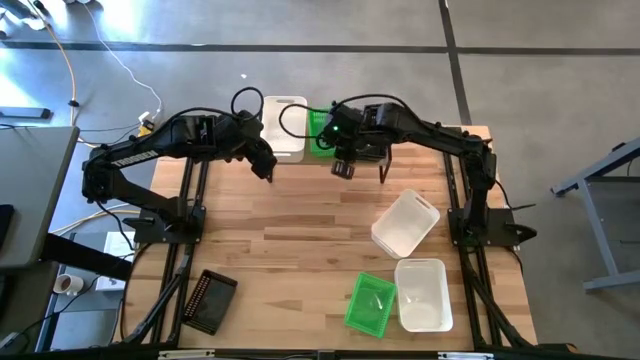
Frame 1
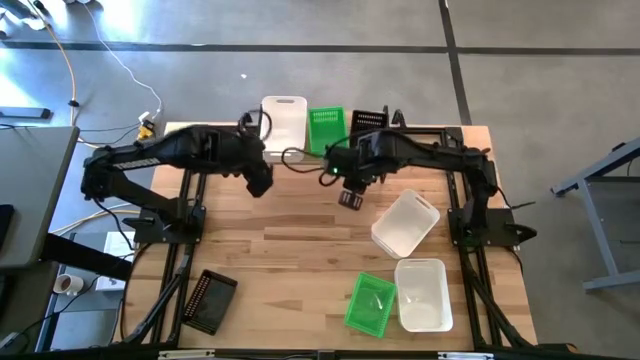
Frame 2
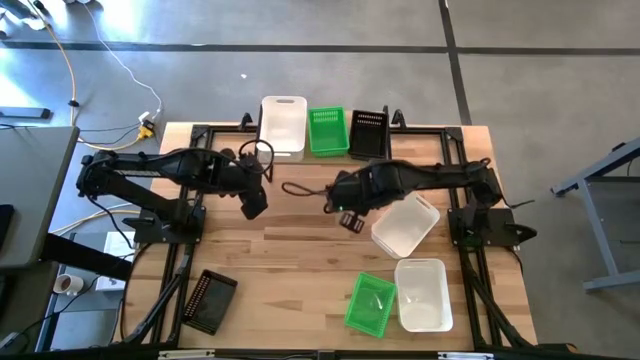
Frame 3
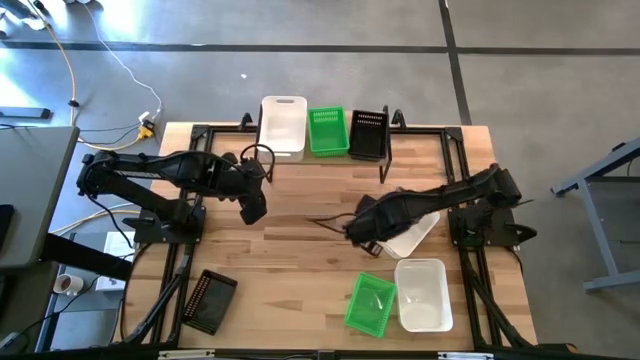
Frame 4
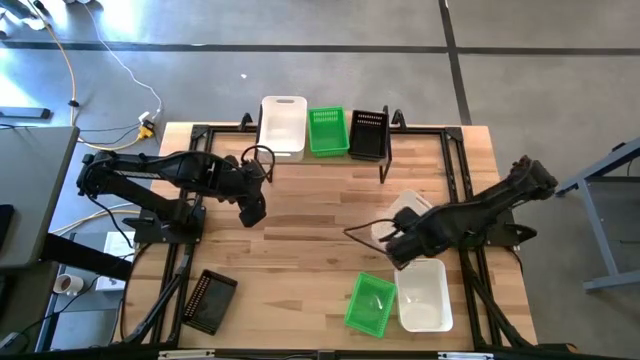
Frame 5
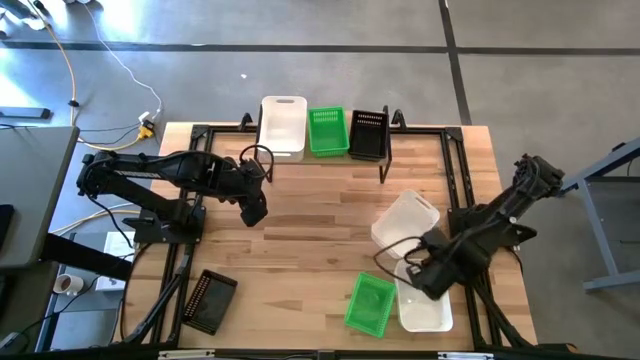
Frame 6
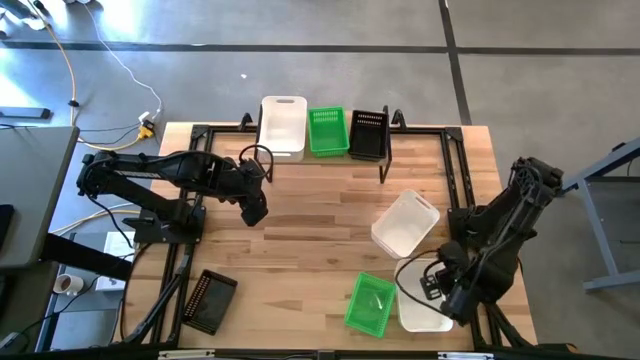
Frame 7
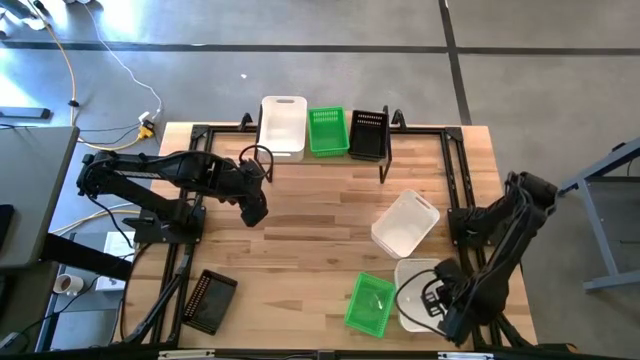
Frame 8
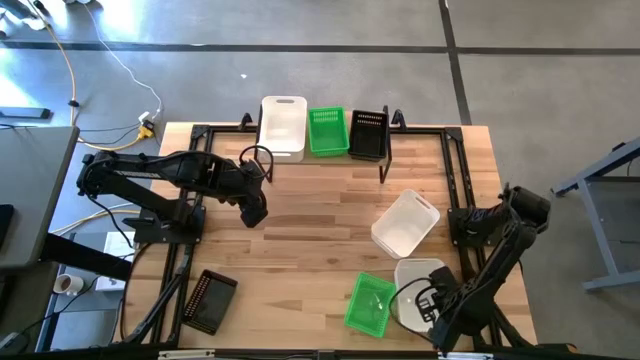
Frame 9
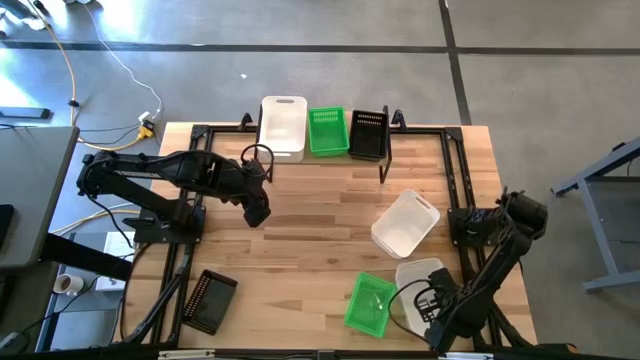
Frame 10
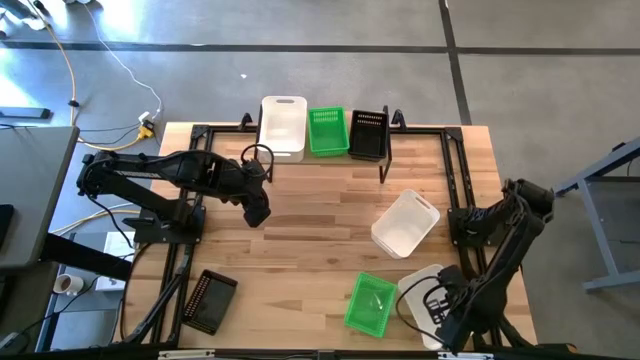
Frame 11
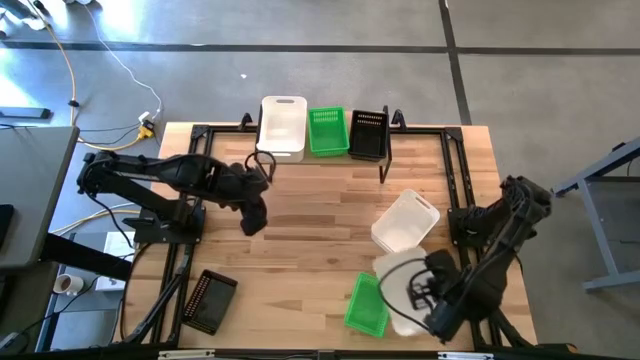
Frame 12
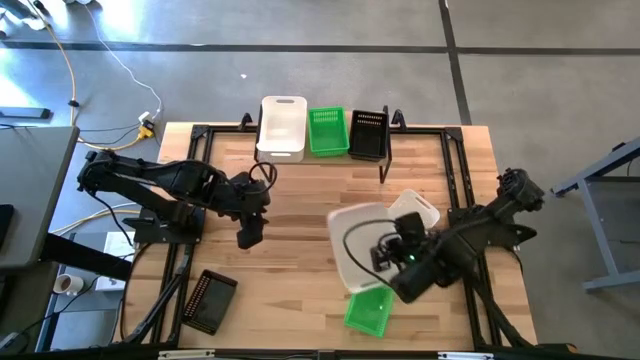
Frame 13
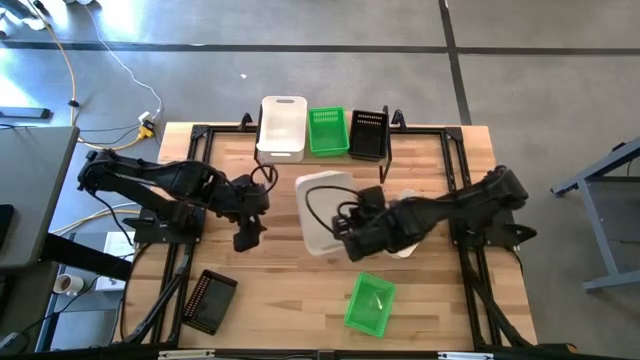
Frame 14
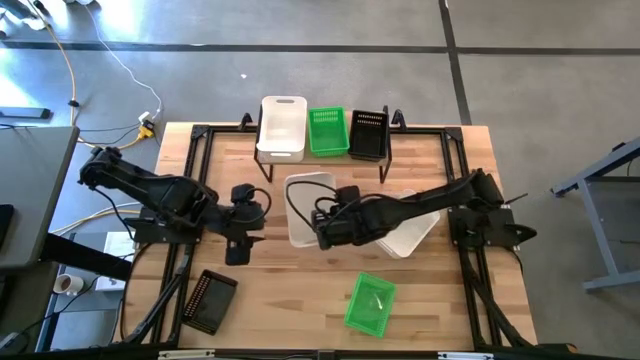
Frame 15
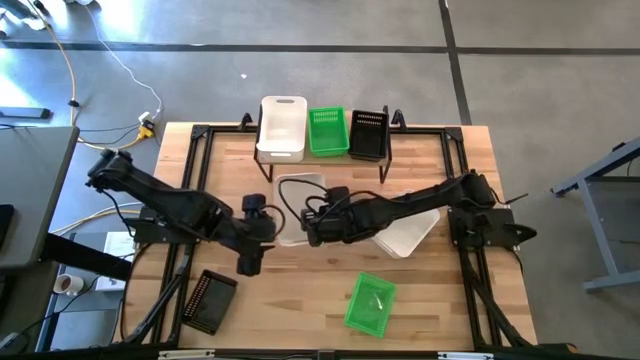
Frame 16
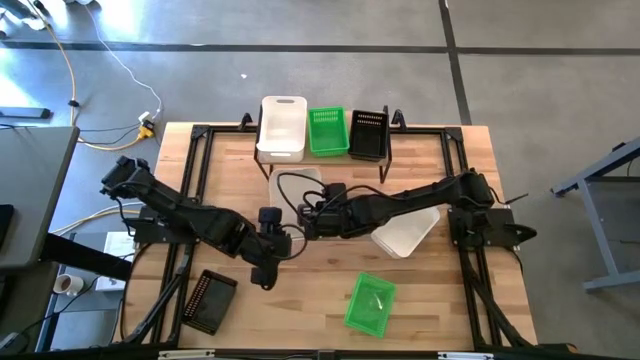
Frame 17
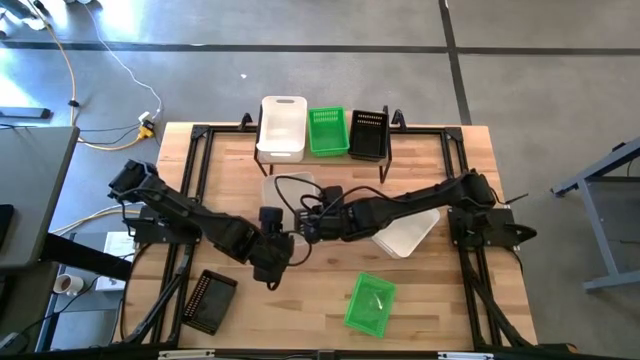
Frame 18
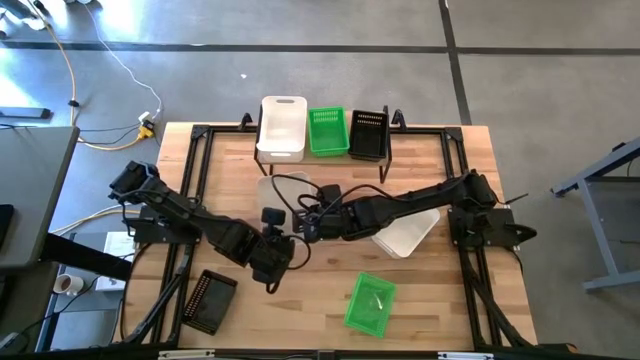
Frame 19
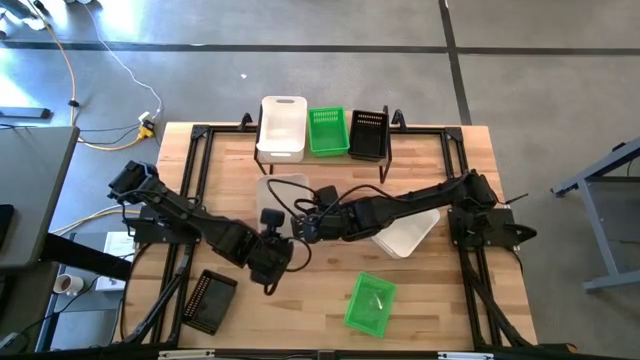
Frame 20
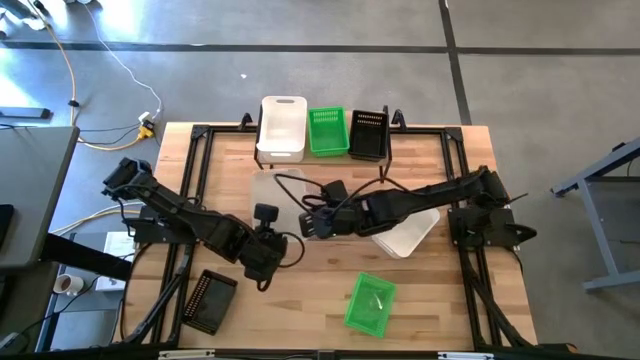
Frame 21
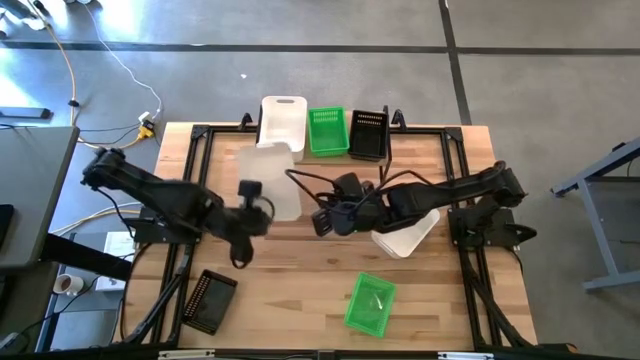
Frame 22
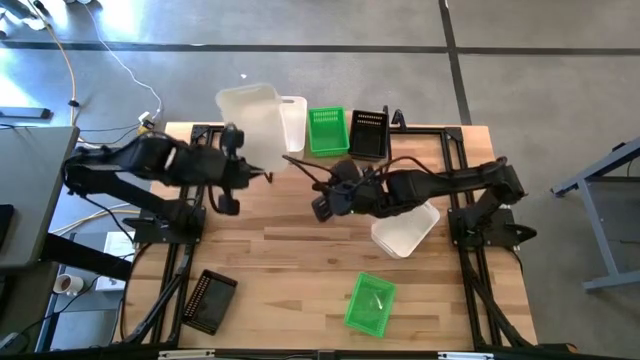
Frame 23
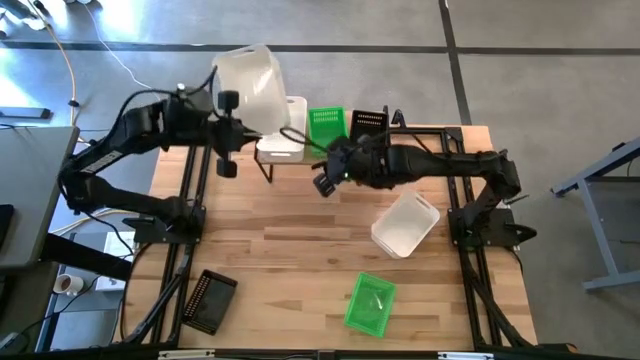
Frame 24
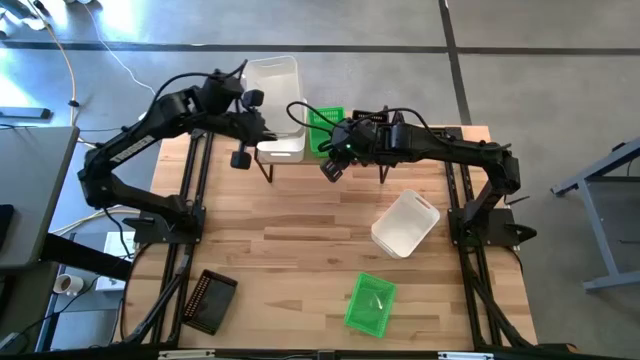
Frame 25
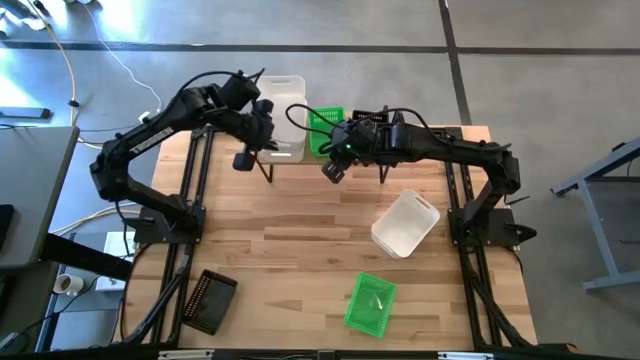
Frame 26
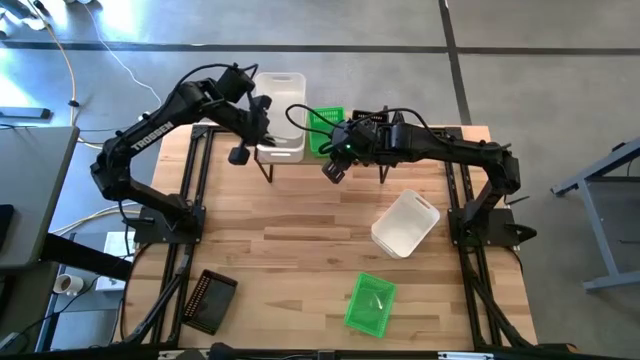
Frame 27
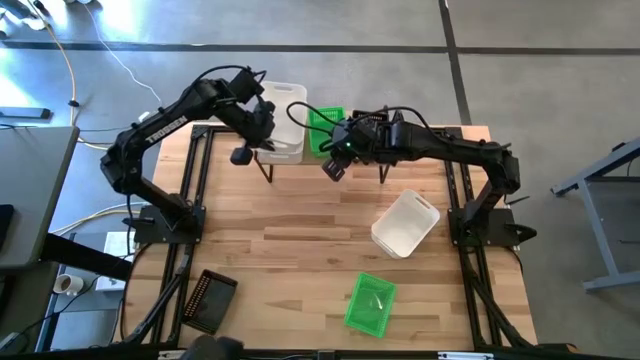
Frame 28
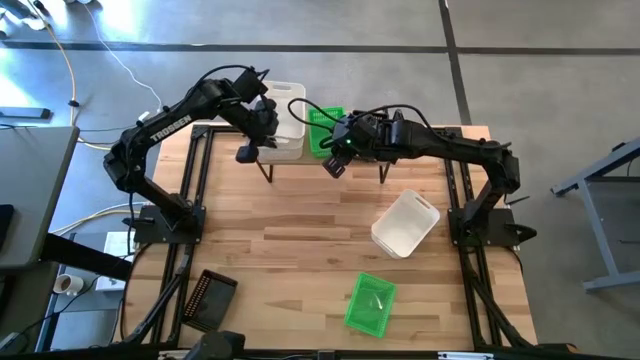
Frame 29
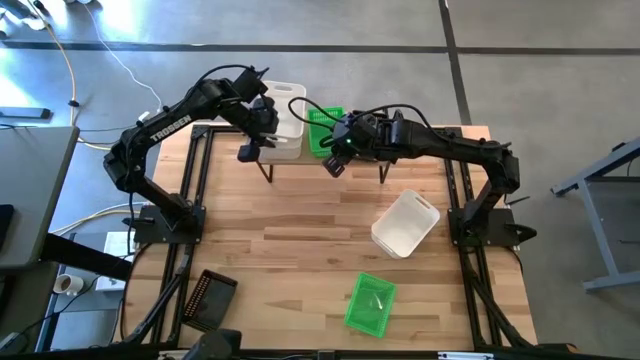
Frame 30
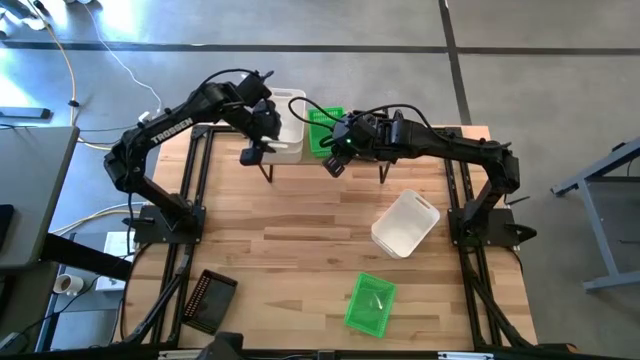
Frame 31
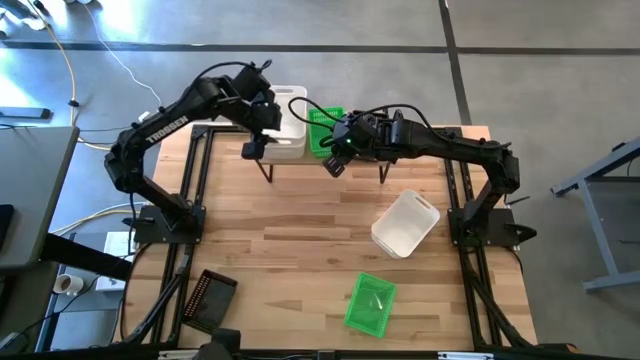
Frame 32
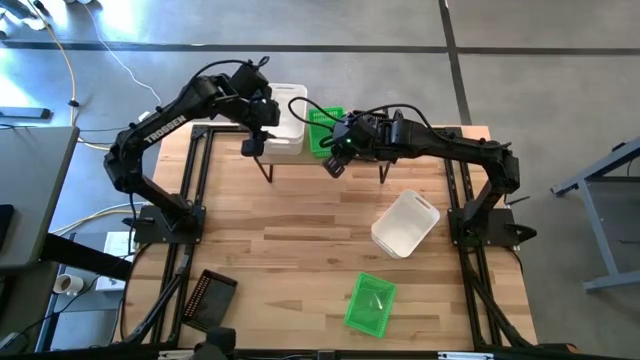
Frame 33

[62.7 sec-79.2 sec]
Task: Stack baskets on shelf by color
Stack the bottom white bin on top of the white bin

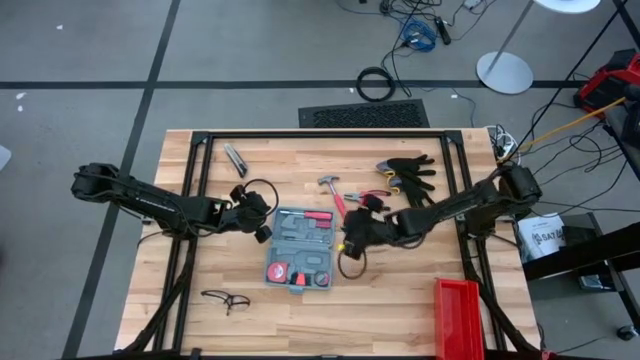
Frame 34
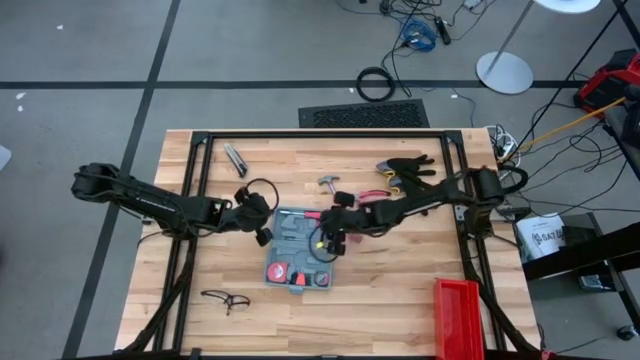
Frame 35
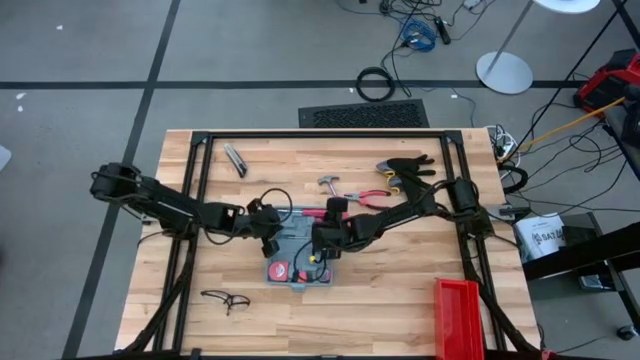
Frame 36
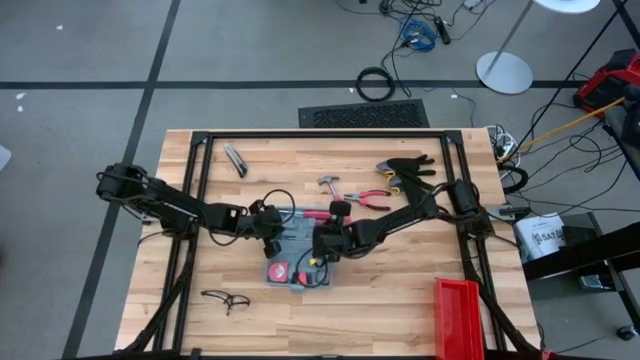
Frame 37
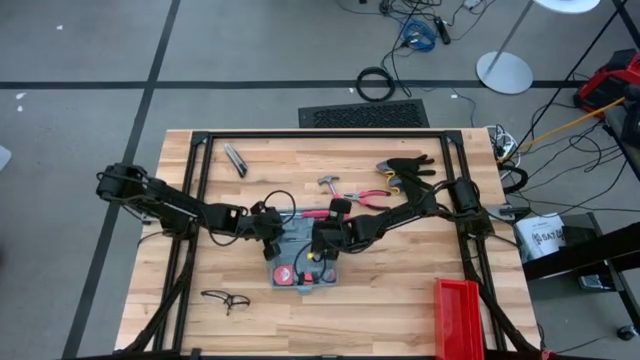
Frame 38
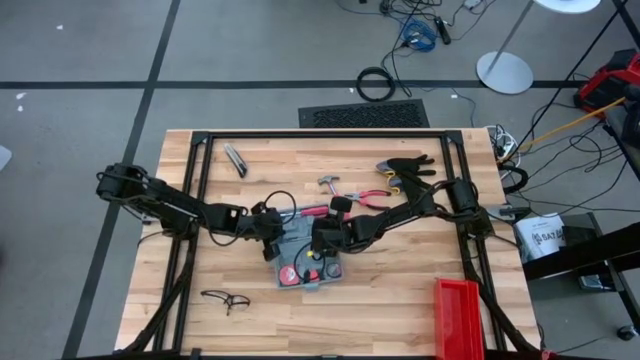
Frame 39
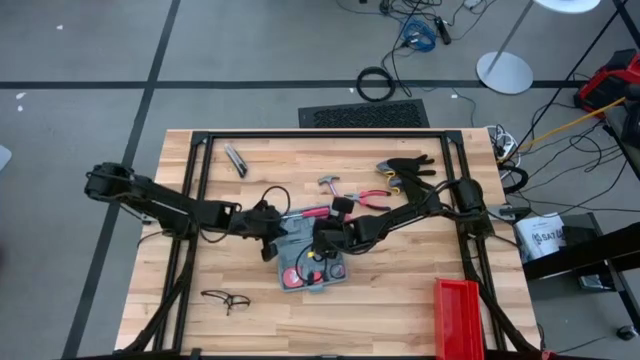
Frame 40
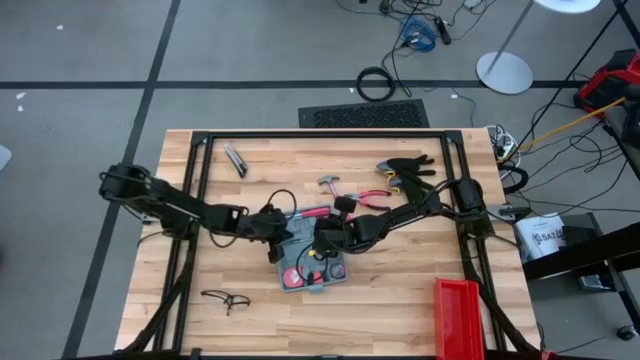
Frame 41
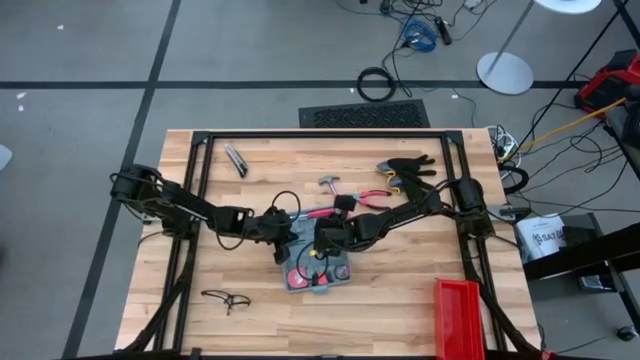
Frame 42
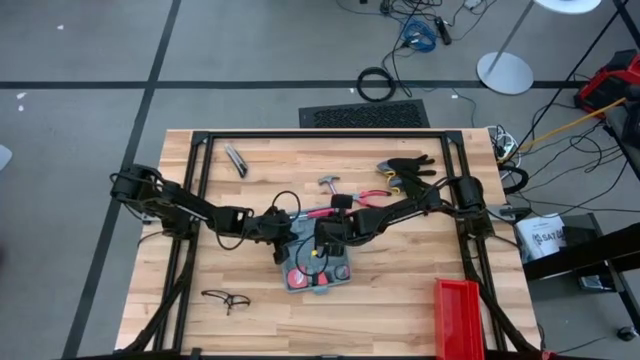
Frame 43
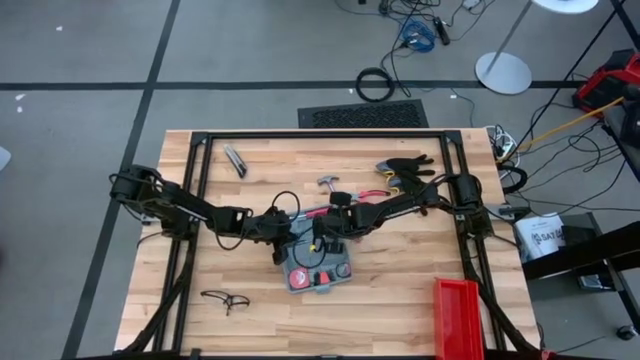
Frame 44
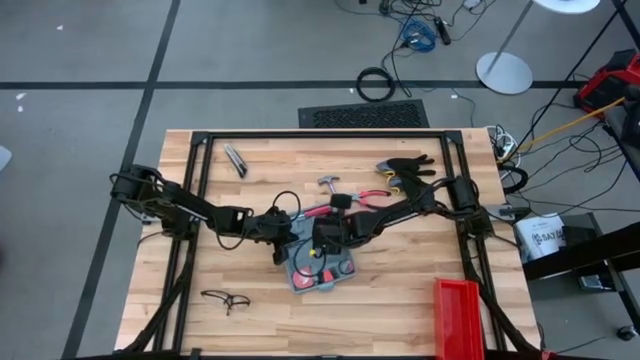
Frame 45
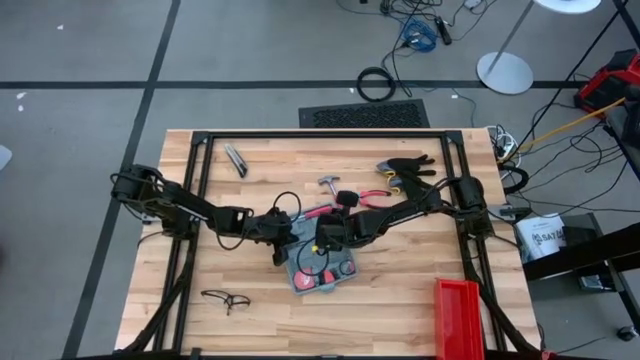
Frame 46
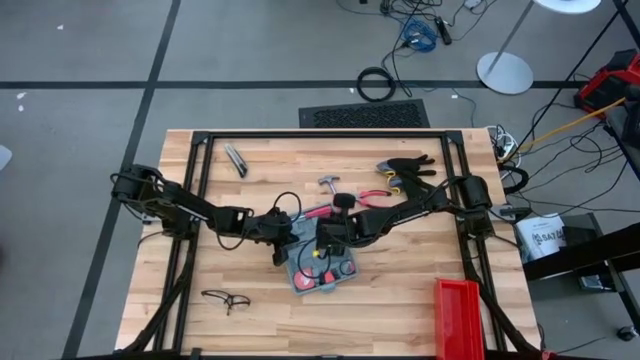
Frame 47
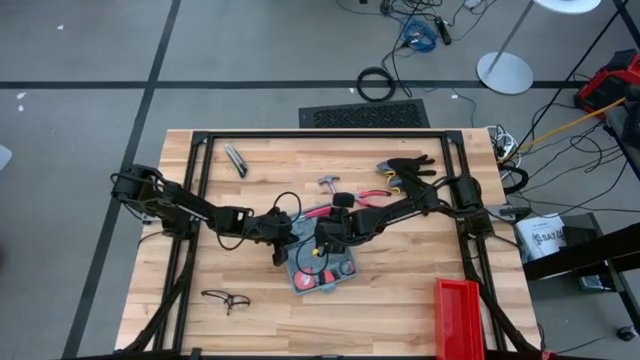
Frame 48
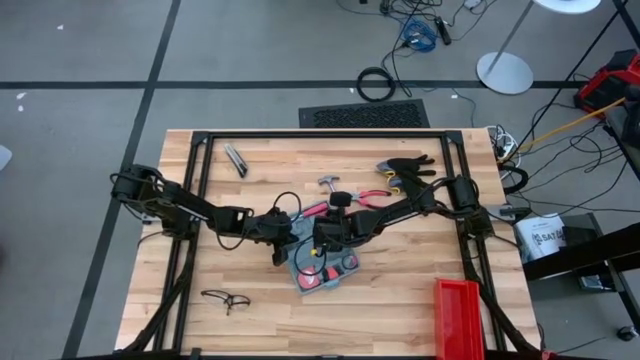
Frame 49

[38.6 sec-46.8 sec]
Task: prefit tool cases
Remove the pink terminal block from the gray prefit tool case
